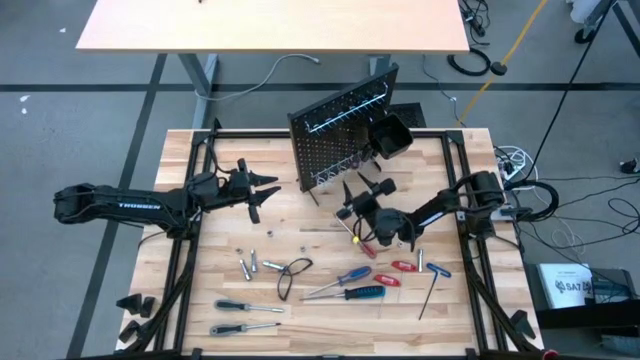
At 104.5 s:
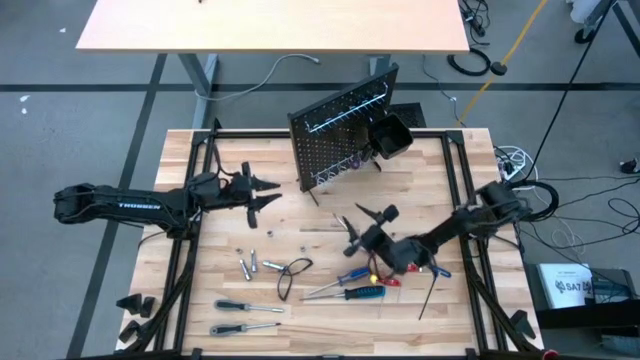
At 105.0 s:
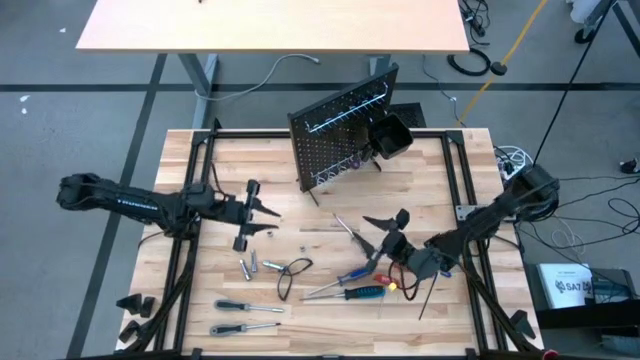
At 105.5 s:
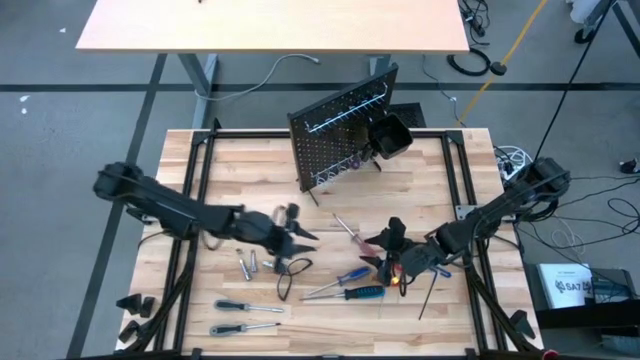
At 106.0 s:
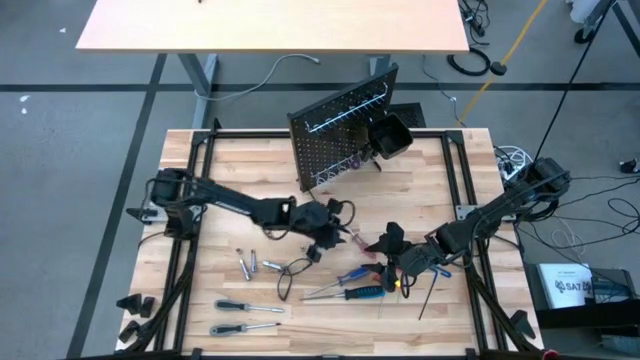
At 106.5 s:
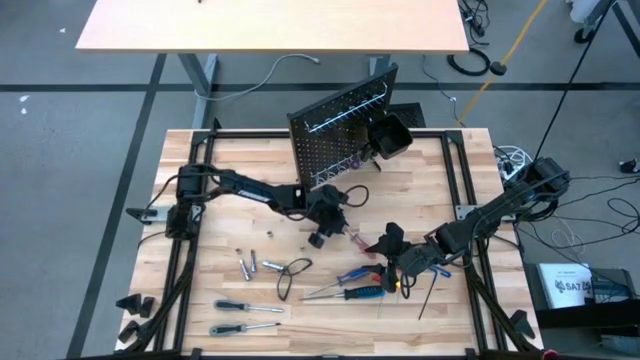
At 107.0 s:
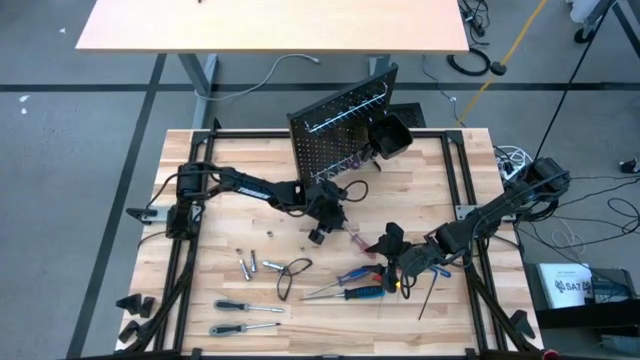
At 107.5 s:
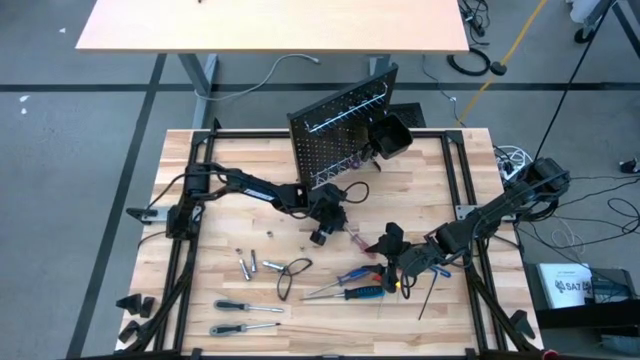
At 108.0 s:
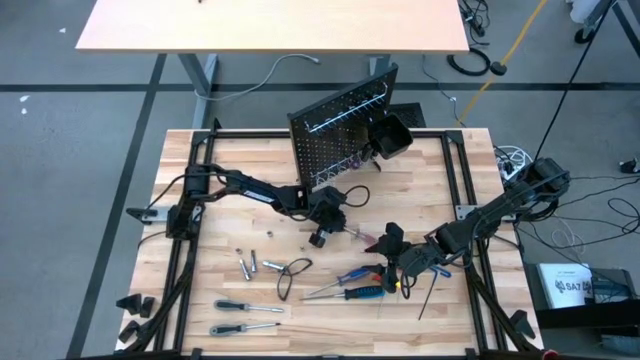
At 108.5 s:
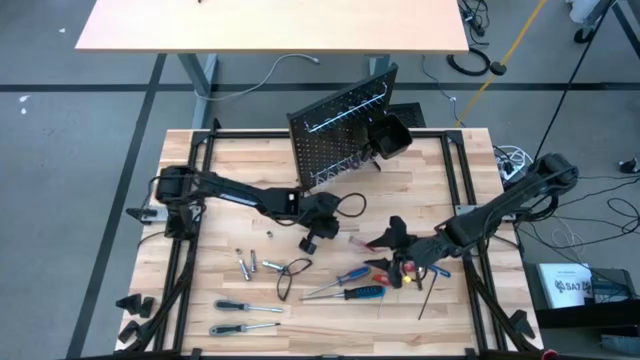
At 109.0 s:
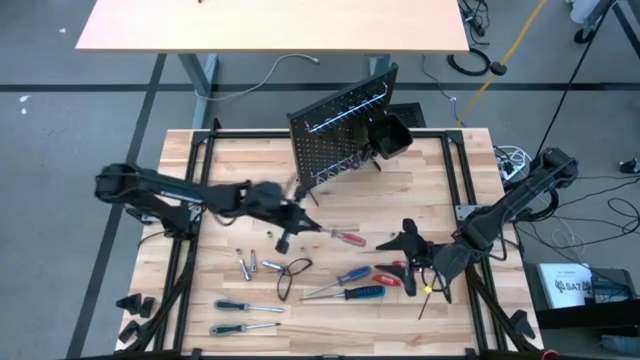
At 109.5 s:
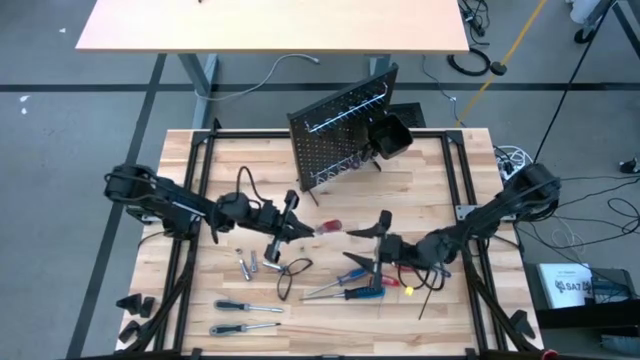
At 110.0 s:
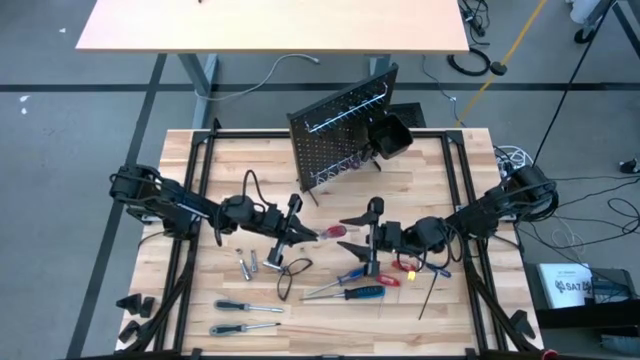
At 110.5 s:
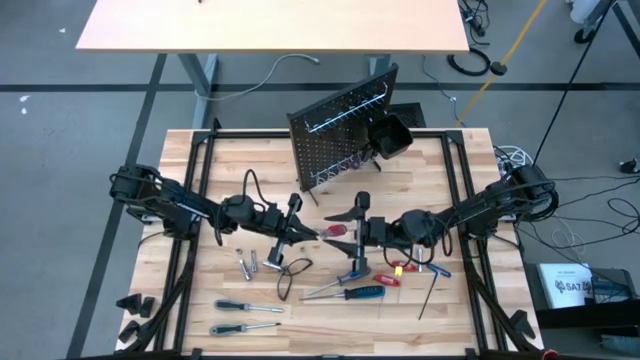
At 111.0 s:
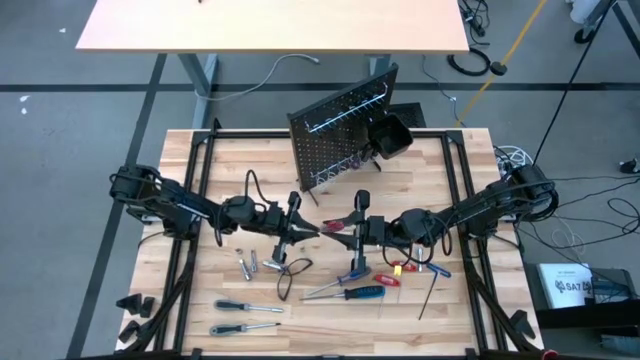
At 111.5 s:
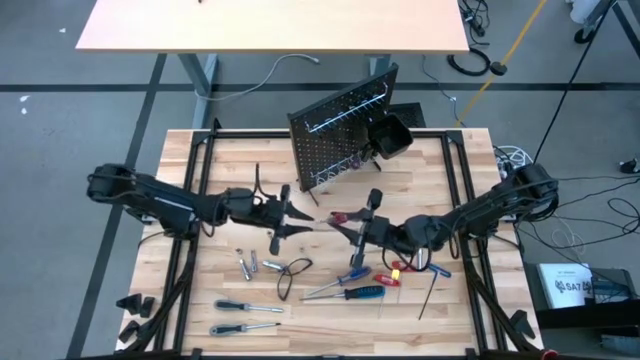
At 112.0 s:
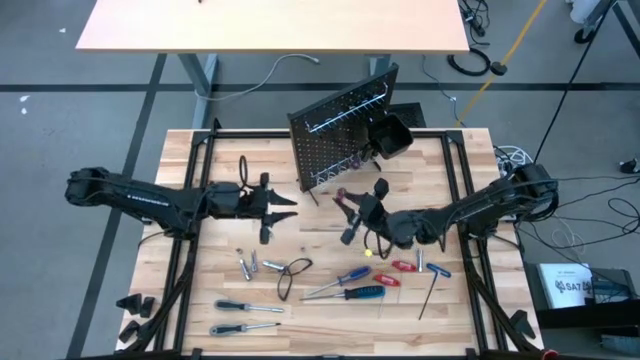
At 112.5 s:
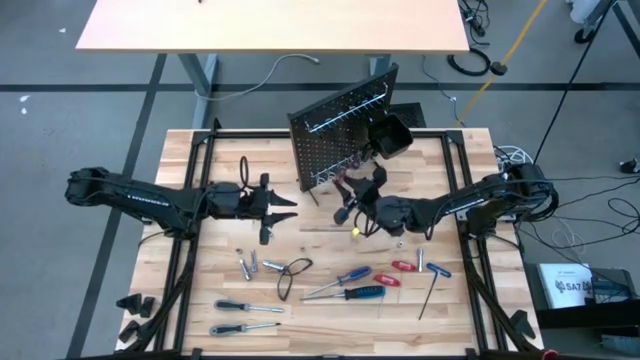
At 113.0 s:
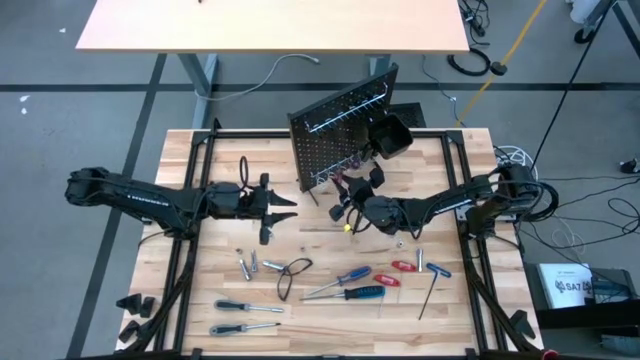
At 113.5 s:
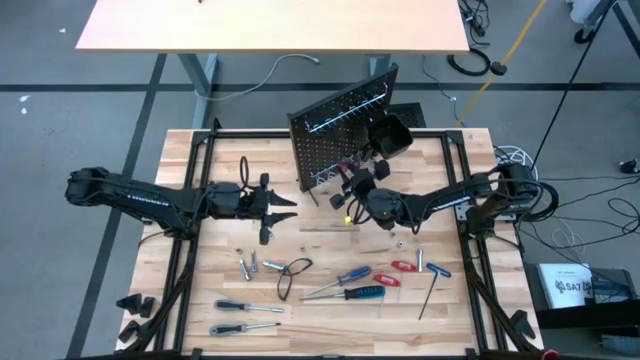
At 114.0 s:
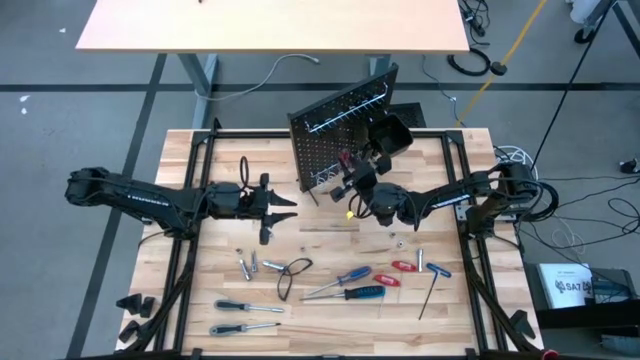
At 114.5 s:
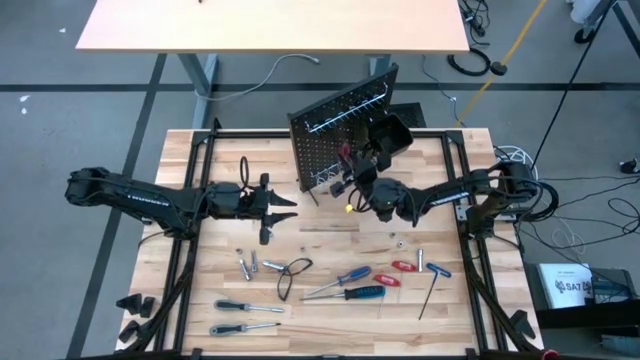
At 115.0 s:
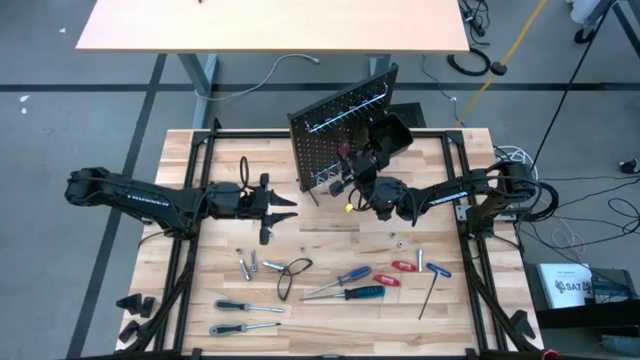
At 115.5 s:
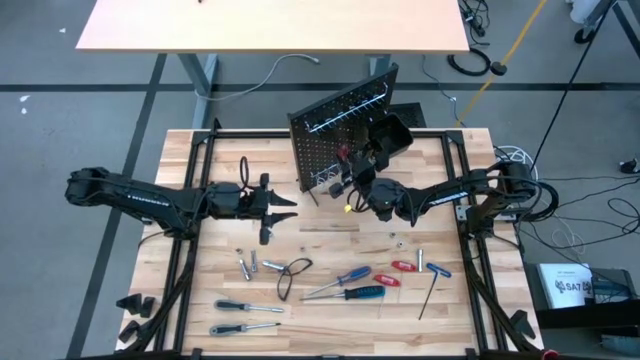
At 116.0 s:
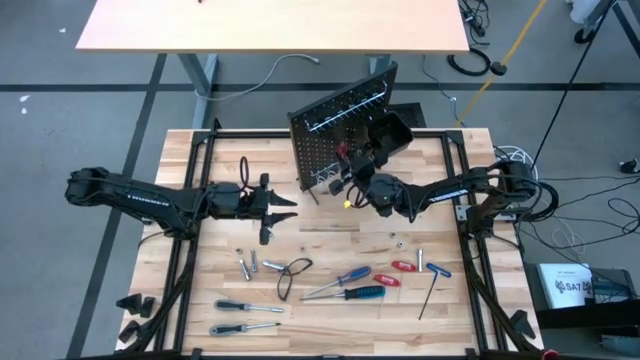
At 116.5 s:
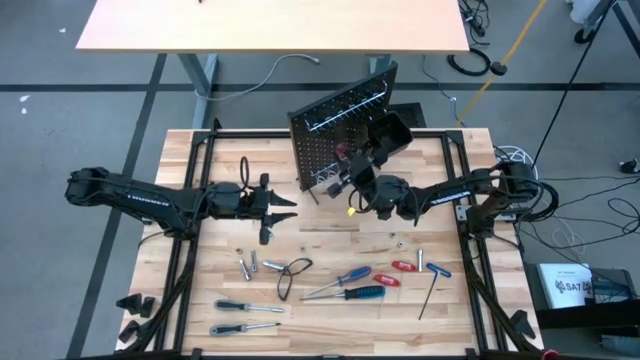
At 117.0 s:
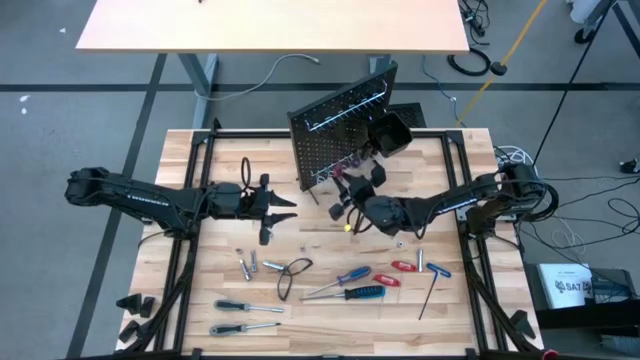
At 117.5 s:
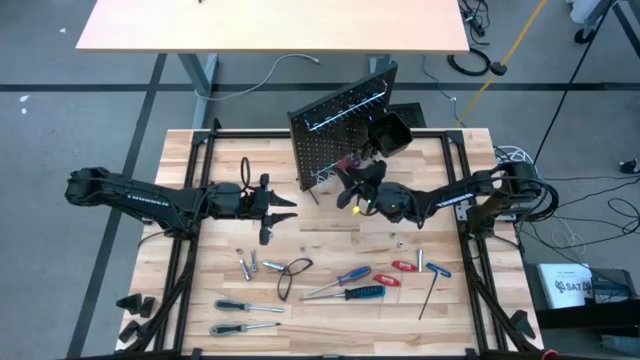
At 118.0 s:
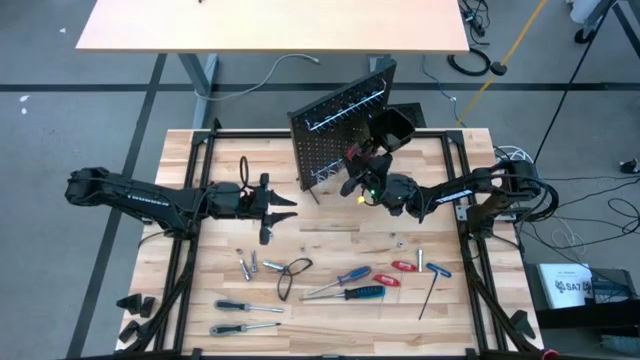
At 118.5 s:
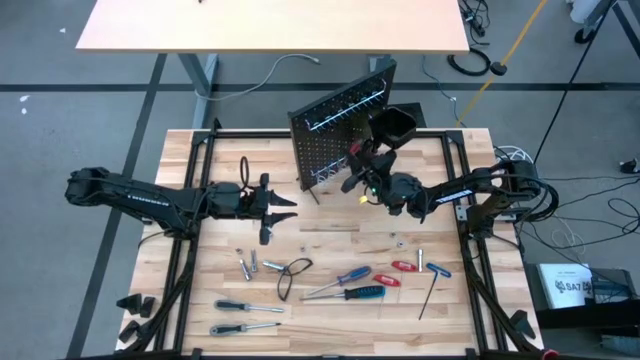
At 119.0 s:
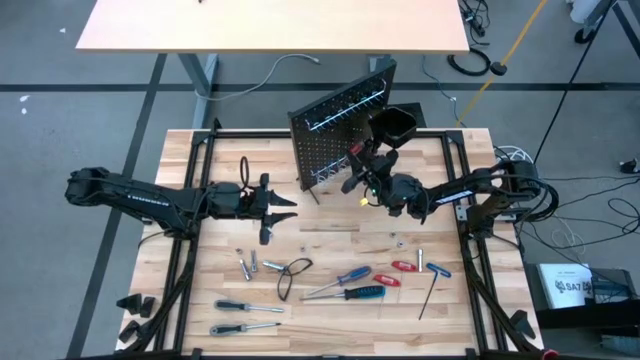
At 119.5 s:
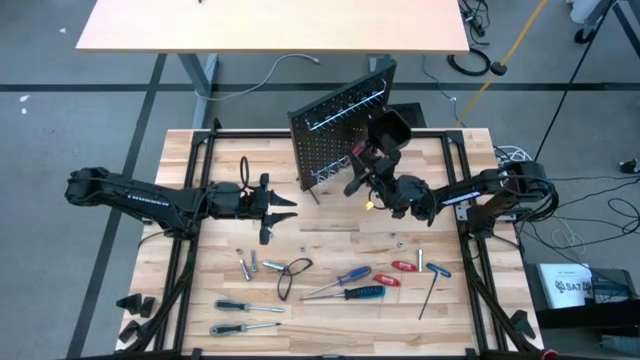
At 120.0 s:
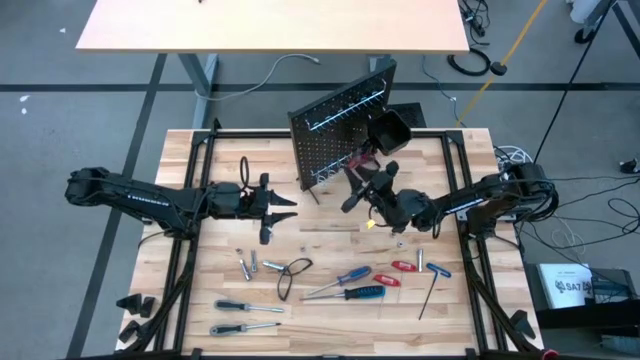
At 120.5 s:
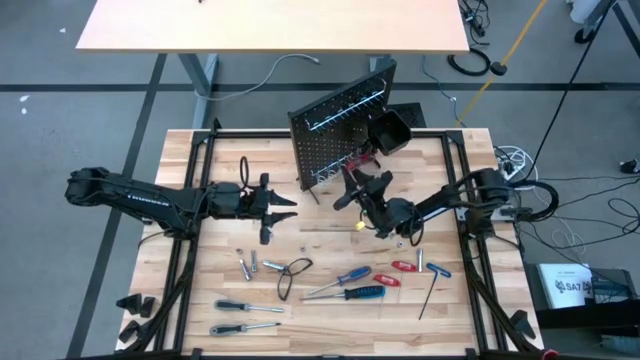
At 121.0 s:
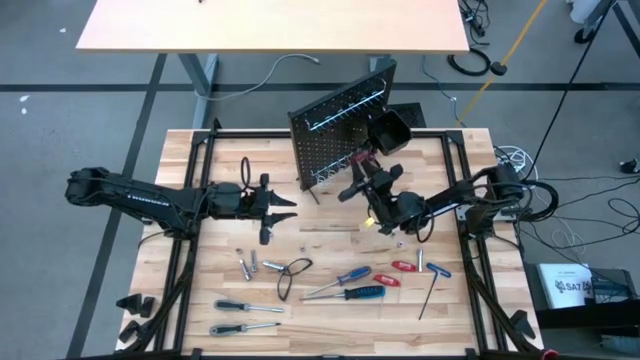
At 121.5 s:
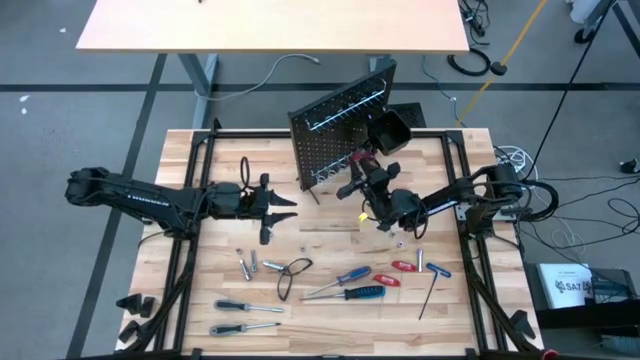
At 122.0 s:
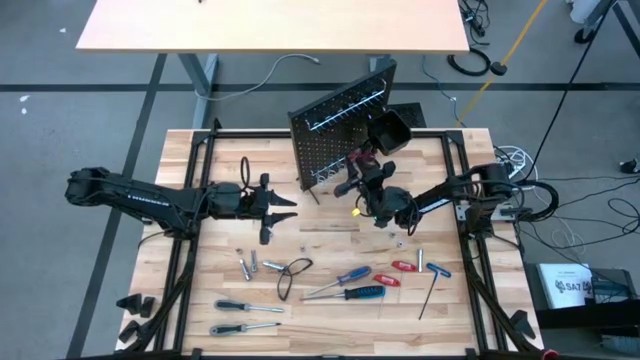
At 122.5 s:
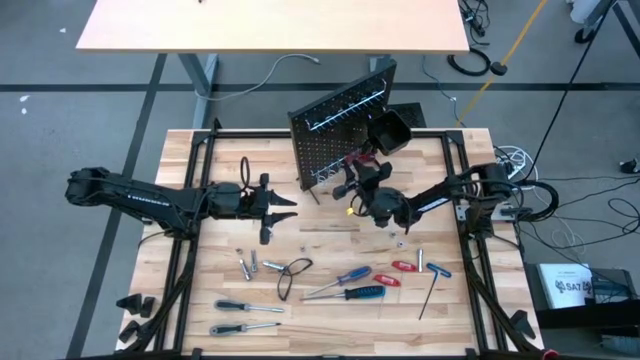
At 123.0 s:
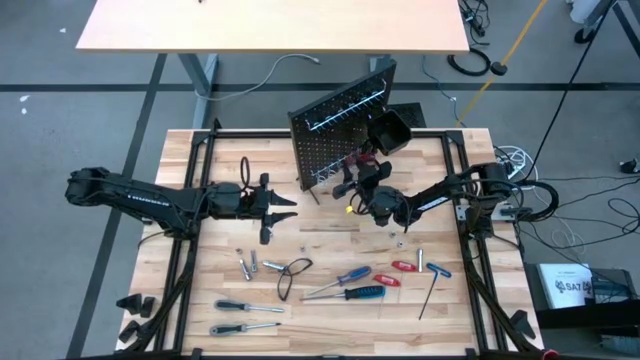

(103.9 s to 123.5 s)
Task: Hang tools onto peg board
Hang the red screwdriver on the peg board

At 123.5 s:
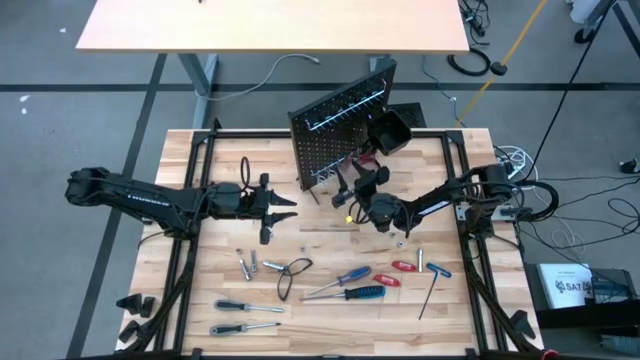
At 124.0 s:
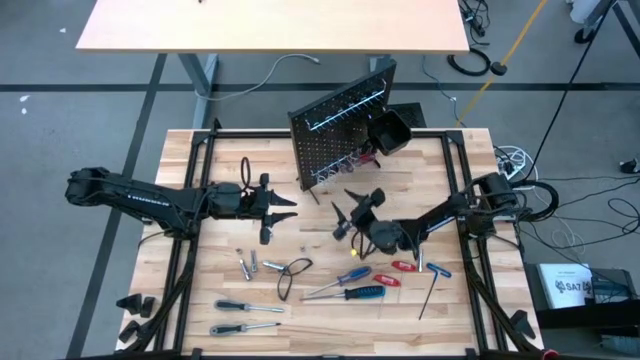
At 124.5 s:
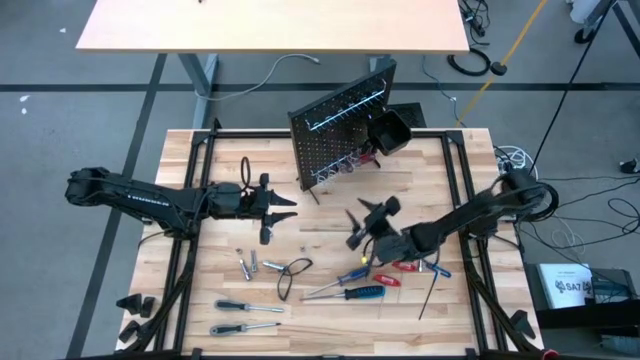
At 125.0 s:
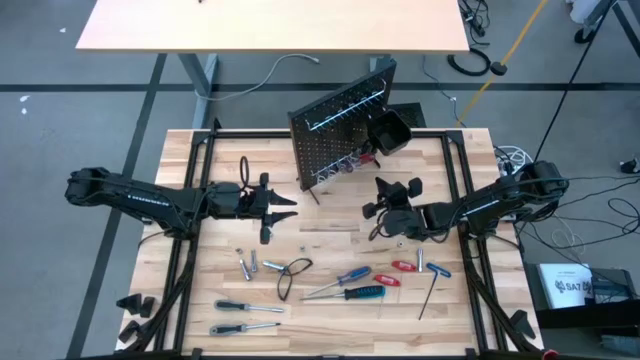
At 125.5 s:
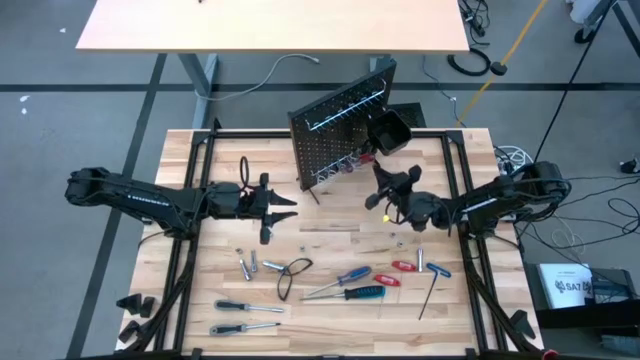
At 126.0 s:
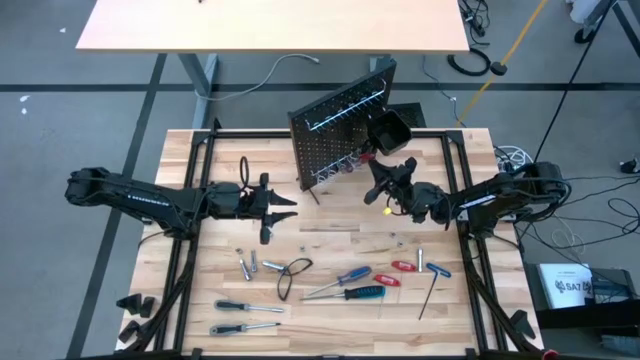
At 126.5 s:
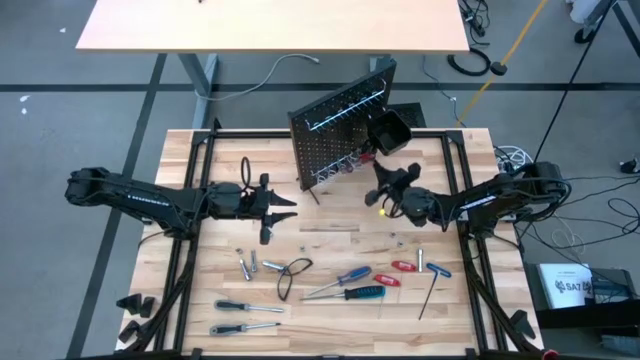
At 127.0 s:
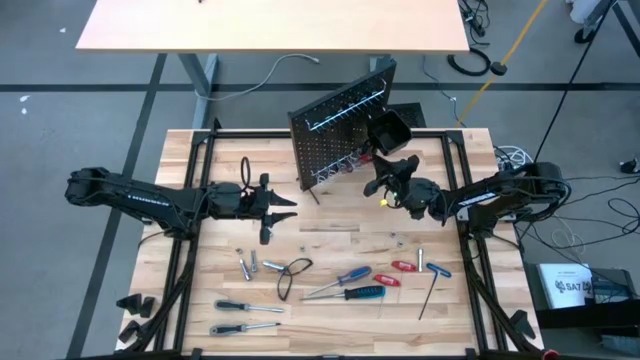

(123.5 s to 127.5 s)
Adjust the right red screwdriver
